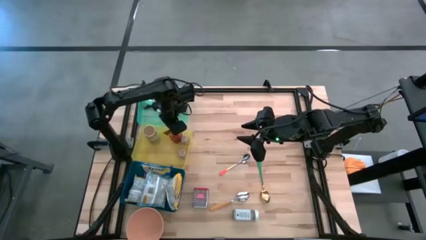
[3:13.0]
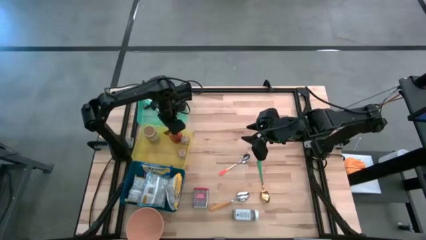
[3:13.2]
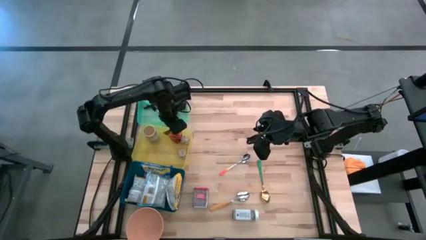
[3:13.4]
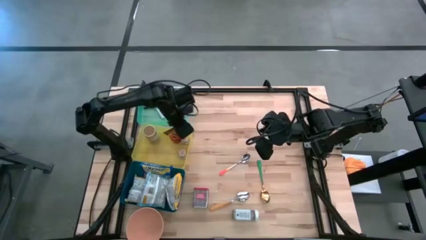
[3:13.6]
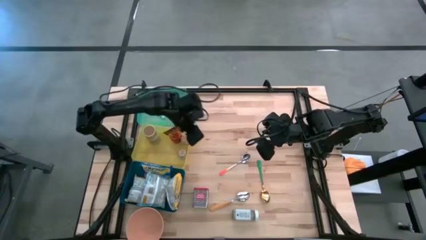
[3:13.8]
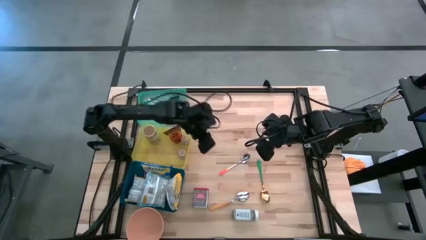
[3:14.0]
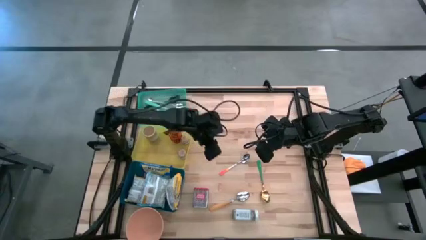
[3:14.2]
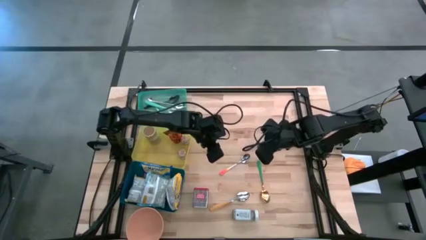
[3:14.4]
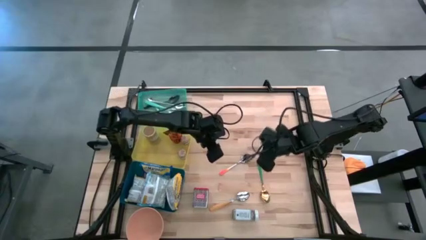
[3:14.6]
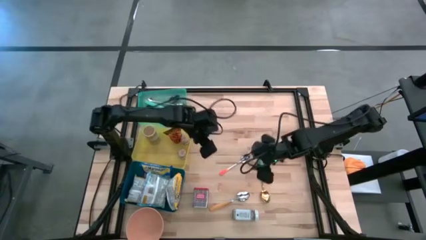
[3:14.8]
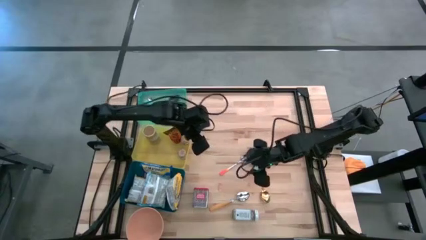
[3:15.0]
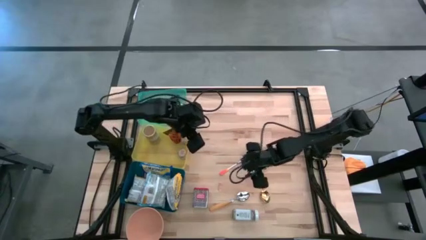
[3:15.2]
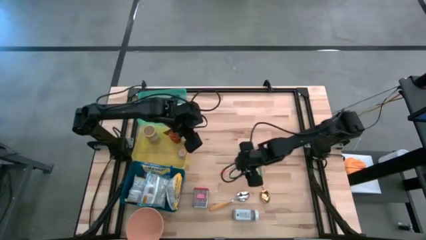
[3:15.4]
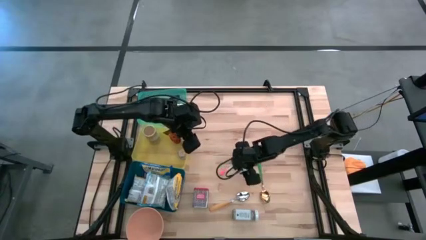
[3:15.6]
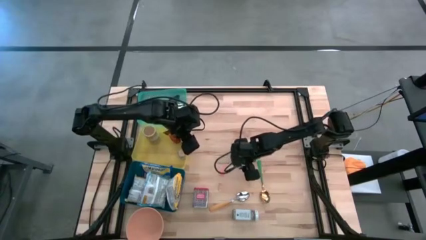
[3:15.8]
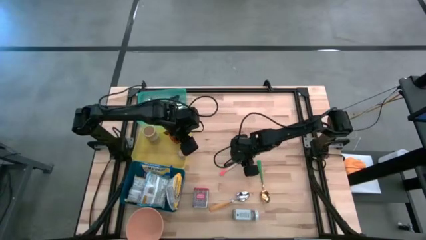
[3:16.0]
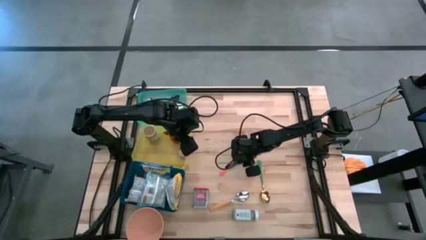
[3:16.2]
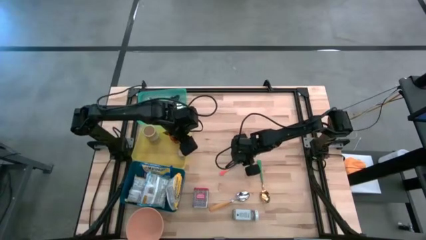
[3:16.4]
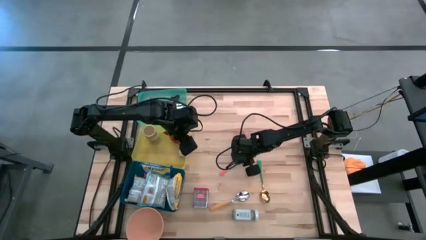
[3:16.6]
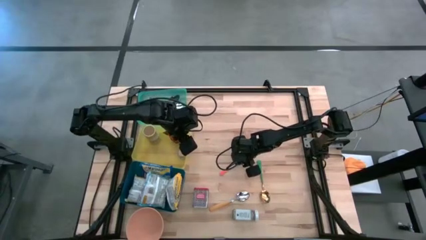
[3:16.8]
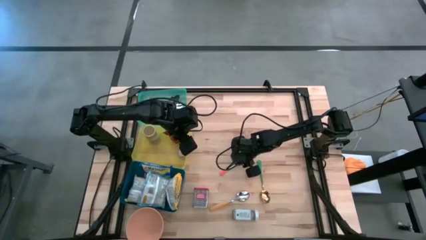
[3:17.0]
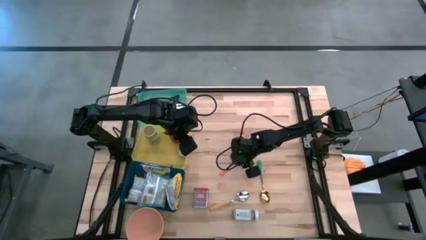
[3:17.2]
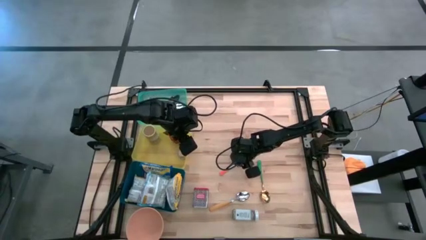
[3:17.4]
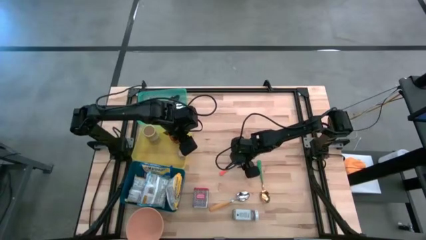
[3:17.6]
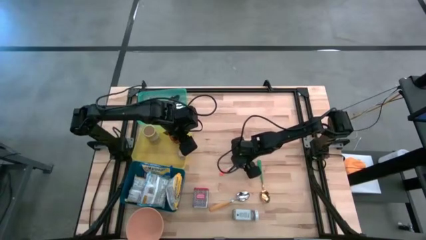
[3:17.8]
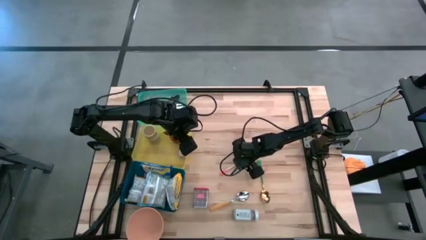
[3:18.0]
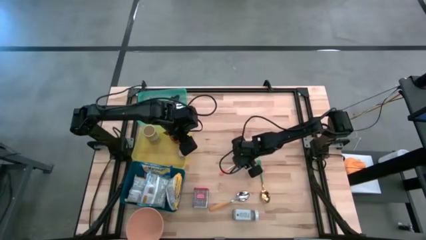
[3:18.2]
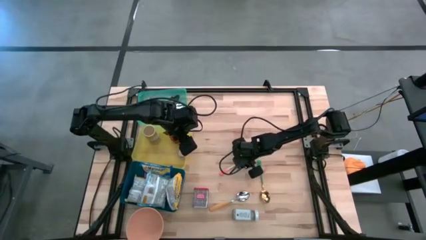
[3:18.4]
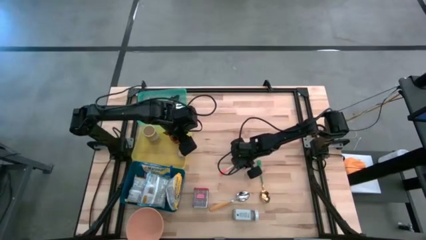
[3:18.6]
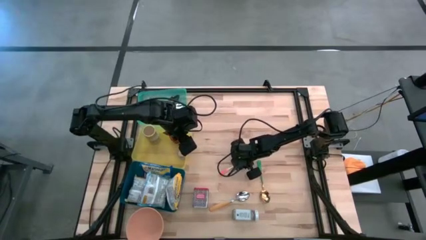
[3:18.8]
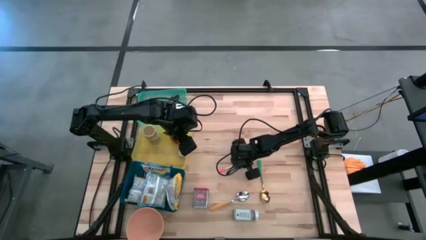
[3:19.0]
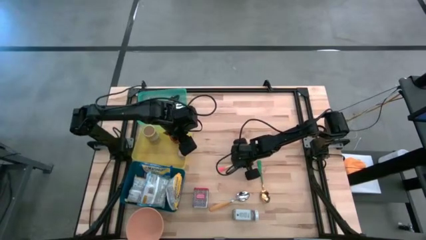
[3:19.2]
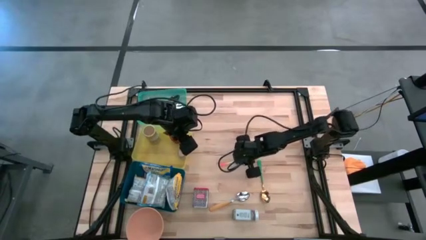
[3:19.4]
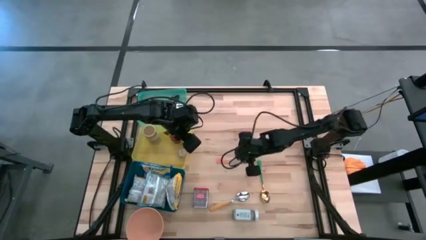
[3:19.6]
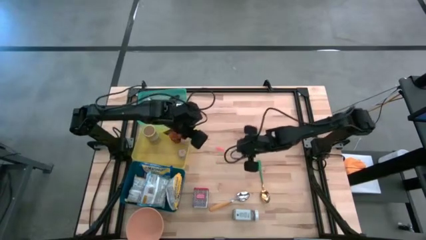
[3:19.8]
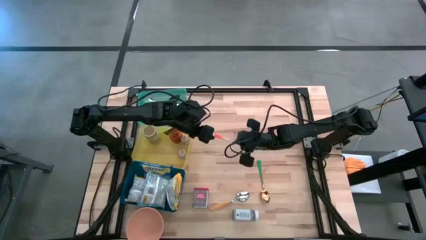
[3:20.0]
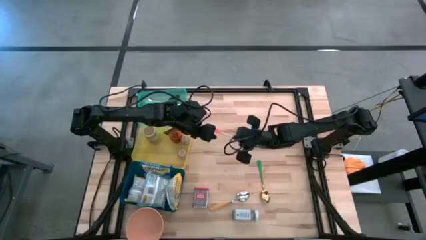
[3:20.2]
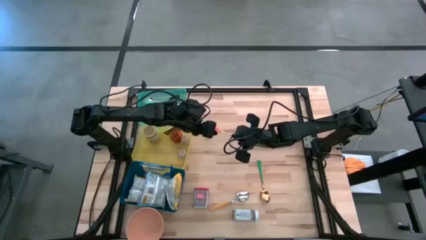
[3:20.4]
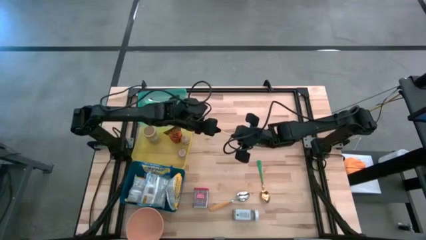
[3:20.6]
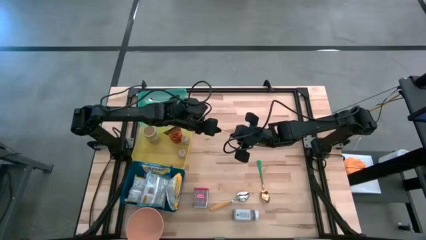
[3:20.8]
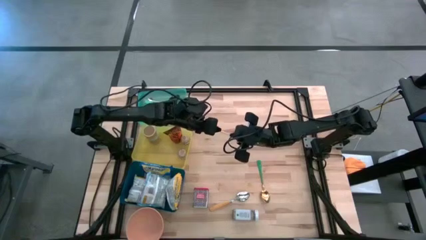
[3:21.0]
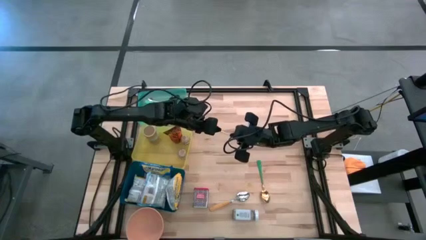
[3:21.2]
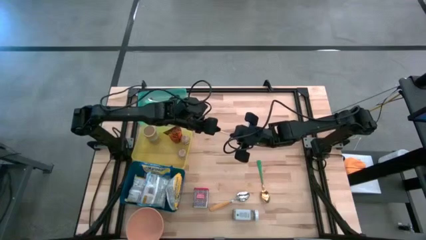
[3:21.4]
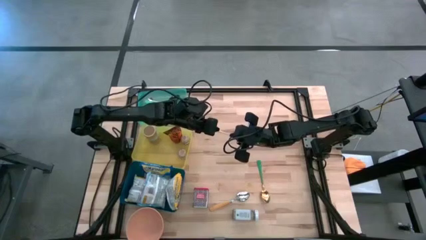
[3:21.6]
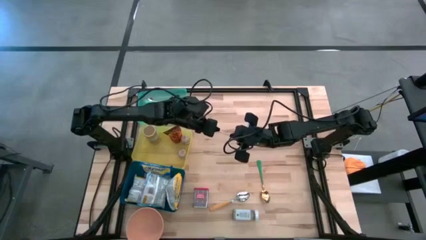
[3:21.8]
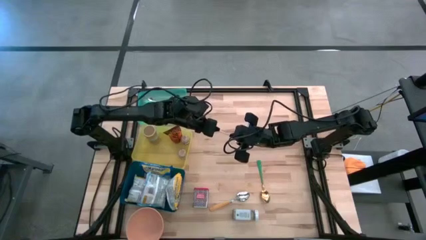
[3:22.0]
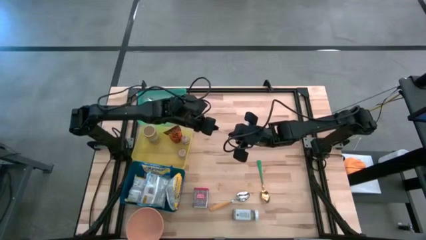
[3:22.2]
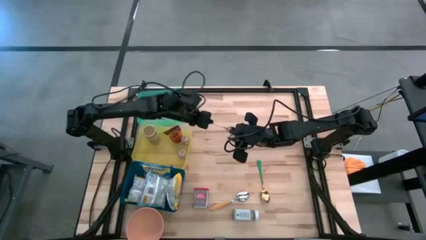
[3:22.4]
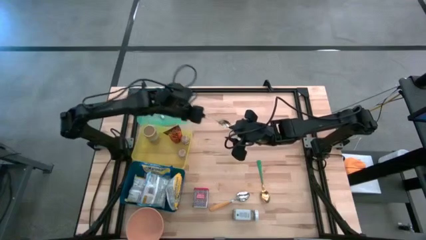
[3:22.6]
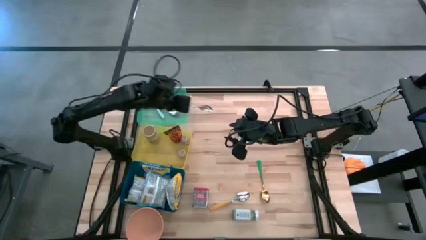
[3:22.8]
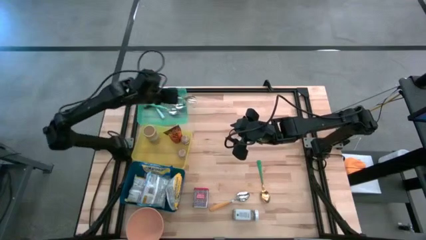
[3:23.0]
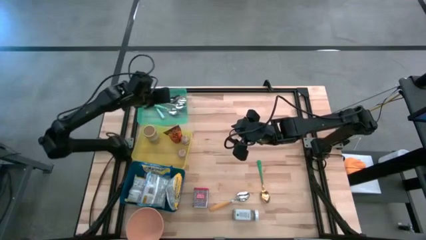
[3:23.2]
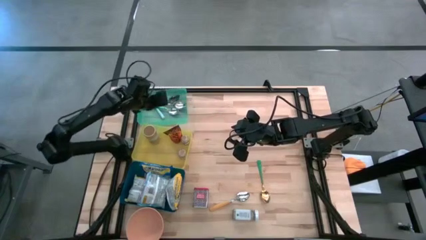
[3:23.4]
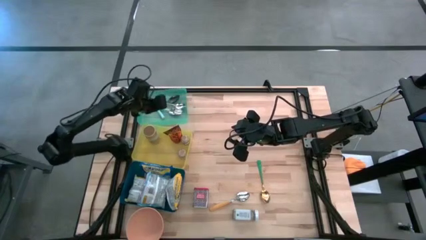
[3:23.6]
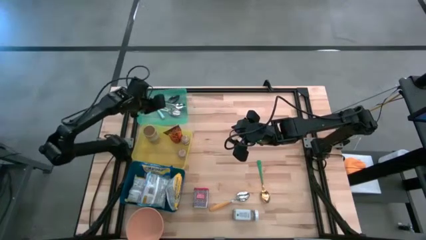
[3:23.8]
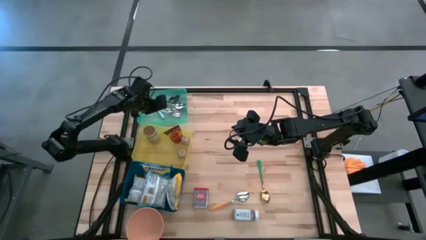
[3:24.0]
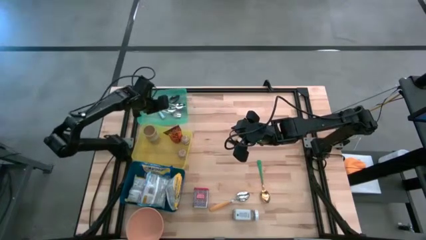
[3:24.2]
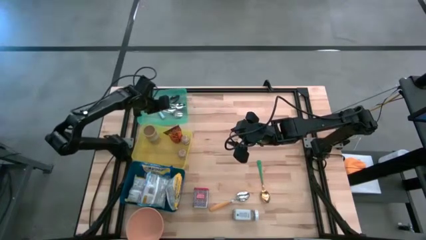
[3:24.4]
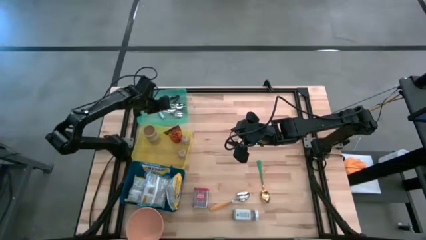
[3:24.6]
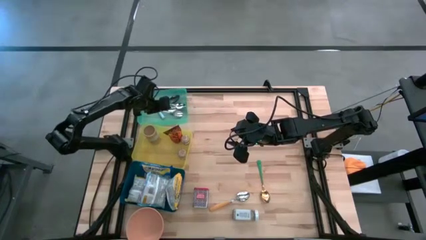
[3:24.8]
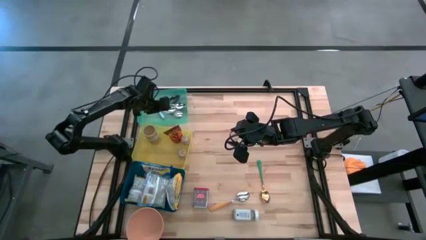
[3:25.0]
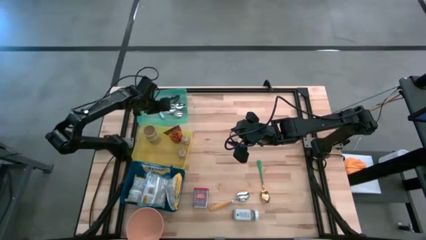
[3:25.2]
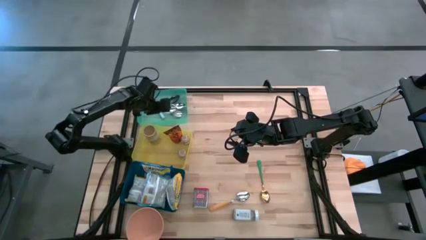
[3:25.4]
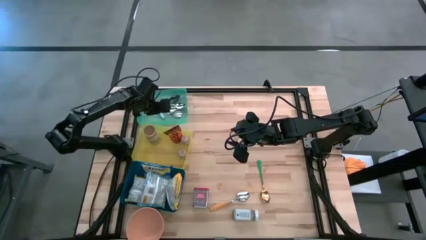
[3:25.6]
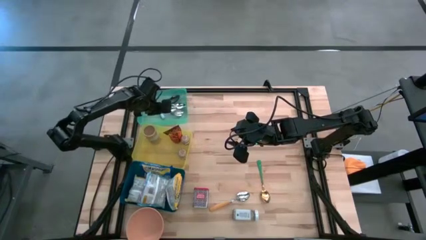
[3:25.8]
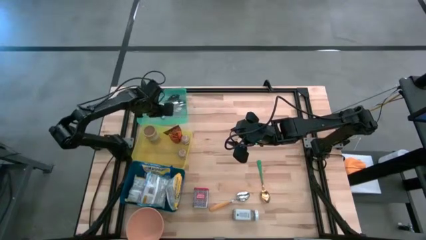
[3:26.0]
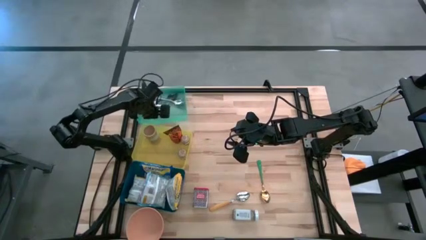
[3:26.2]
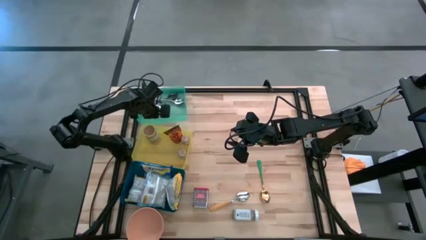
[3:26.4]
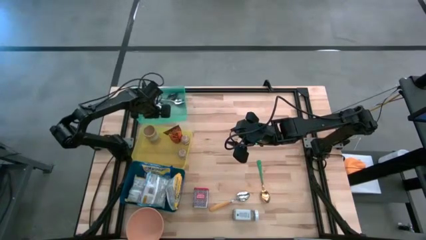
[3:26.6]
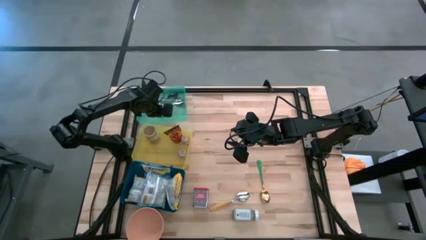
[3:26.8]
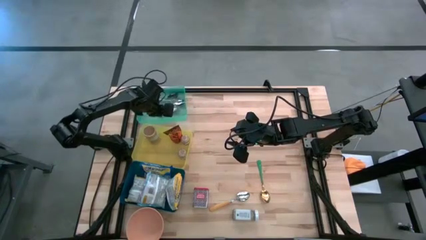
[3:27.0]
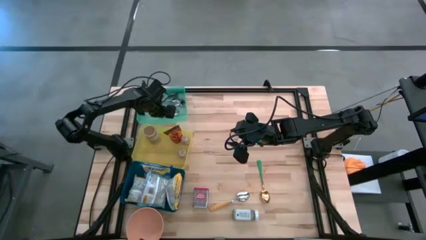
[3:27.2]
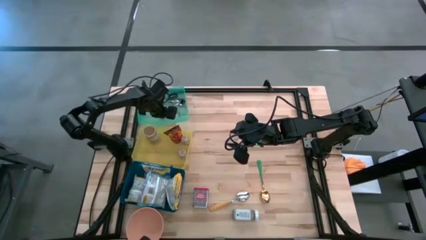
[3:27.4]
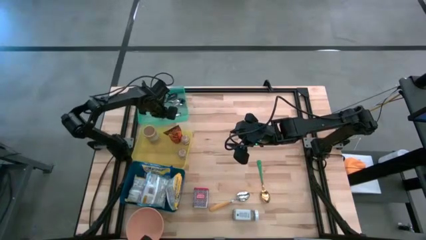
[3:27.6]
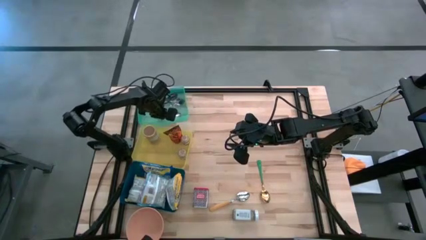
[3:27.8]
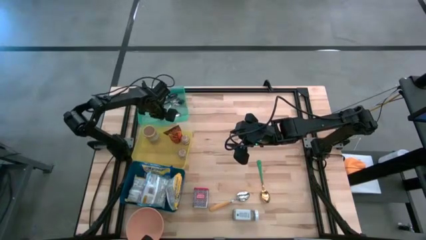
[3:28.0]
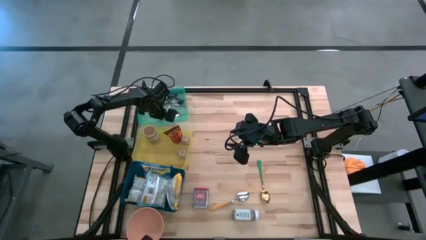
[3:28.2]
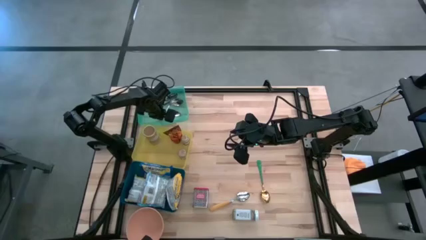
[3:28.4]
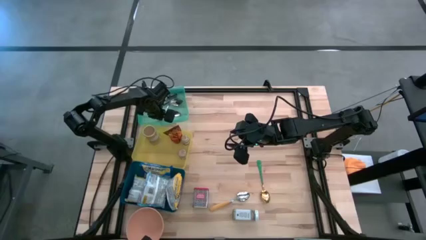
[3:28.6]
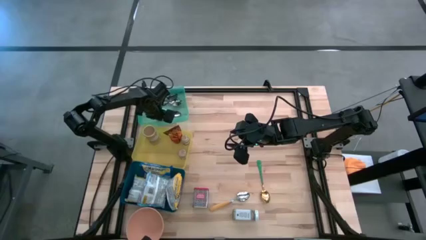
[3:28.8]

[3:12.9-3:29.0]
Put the white spoon into the green bin
